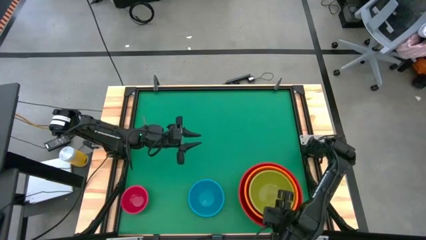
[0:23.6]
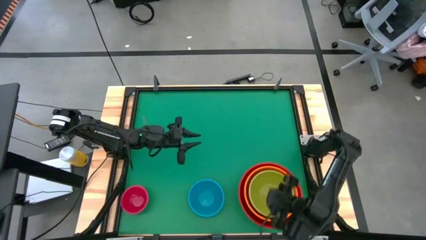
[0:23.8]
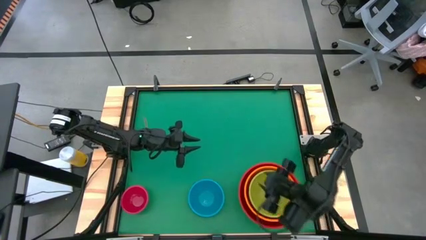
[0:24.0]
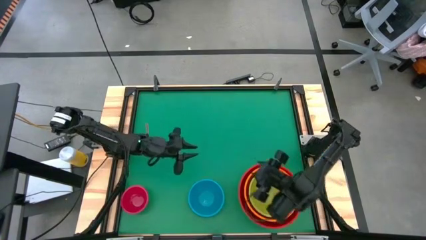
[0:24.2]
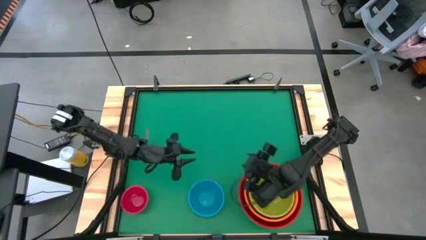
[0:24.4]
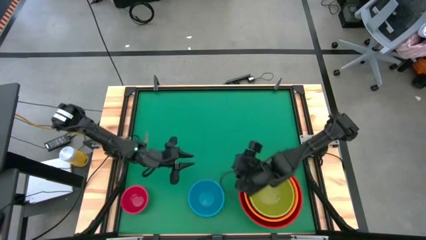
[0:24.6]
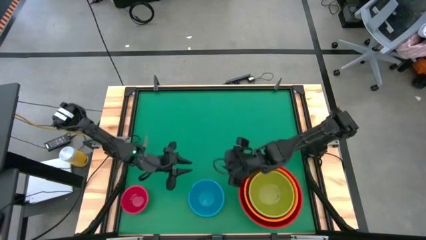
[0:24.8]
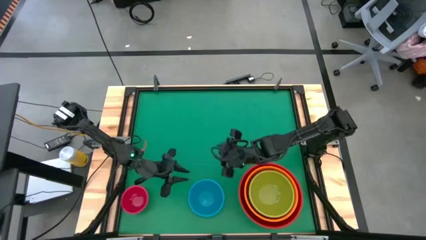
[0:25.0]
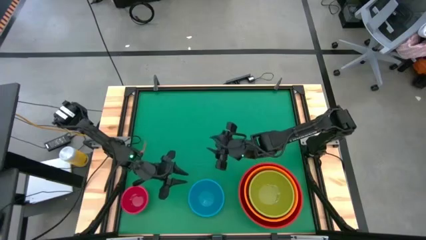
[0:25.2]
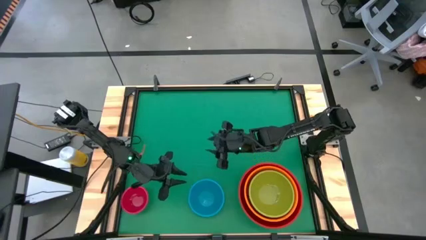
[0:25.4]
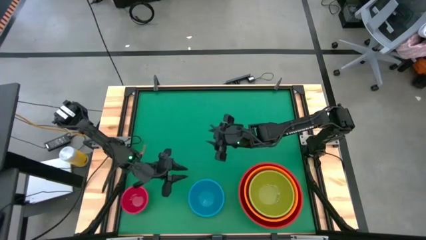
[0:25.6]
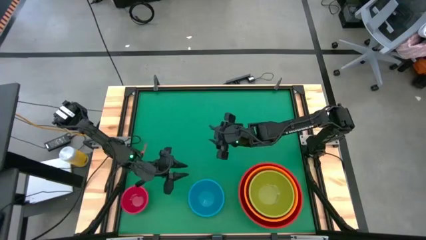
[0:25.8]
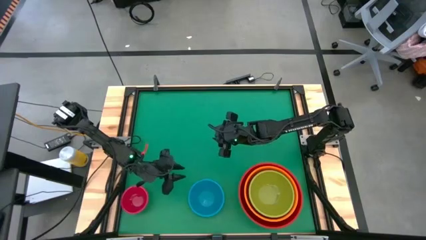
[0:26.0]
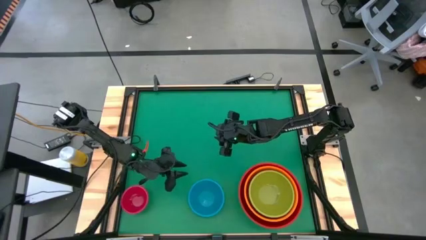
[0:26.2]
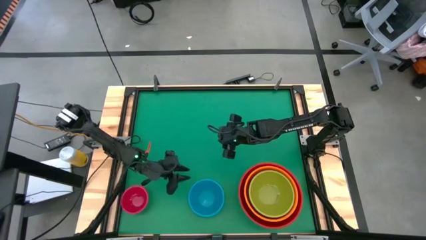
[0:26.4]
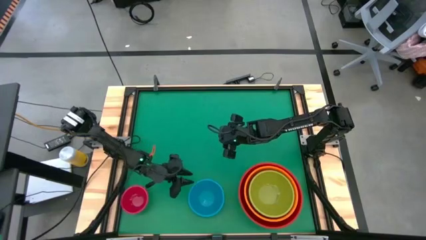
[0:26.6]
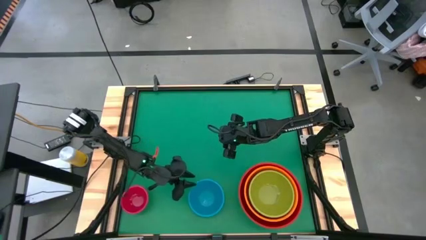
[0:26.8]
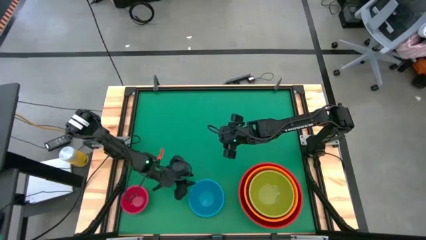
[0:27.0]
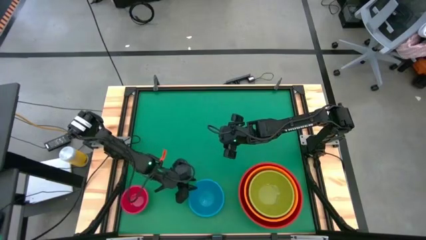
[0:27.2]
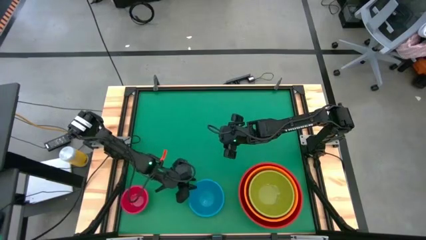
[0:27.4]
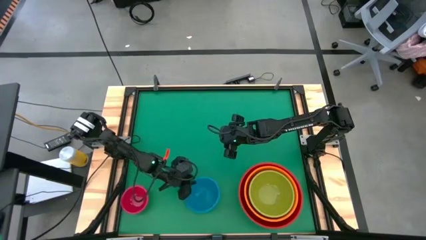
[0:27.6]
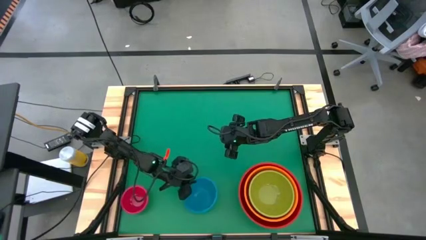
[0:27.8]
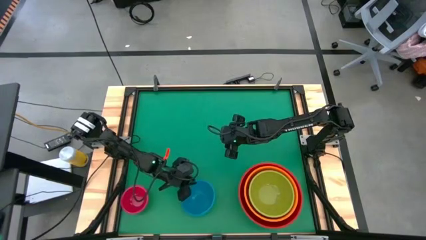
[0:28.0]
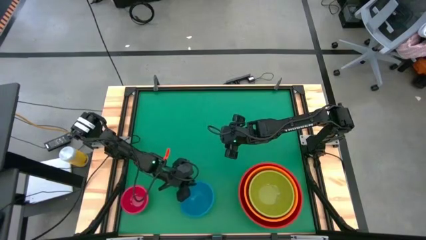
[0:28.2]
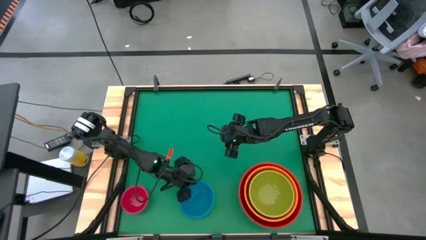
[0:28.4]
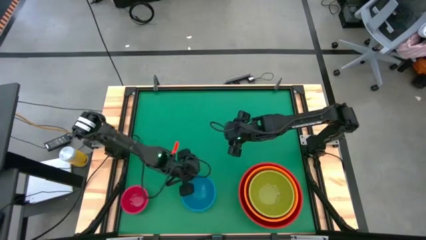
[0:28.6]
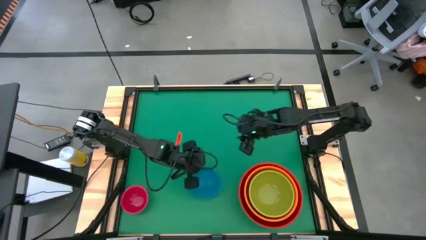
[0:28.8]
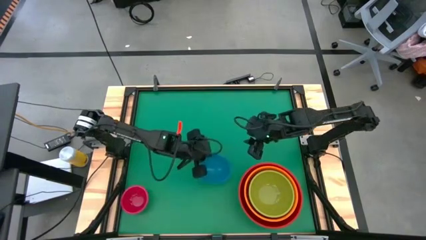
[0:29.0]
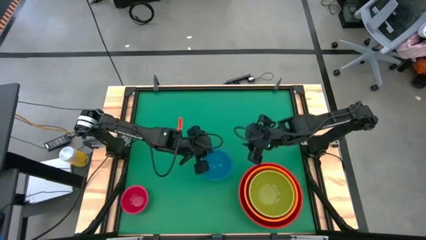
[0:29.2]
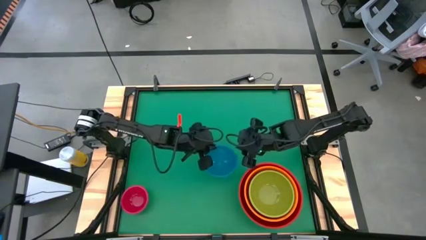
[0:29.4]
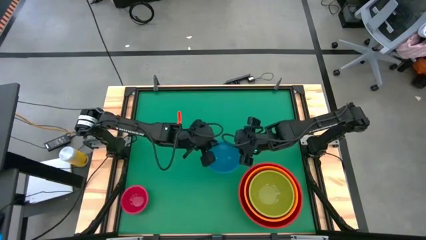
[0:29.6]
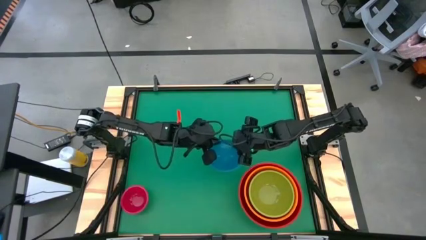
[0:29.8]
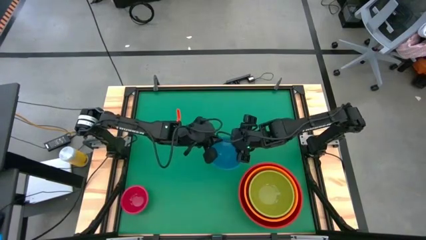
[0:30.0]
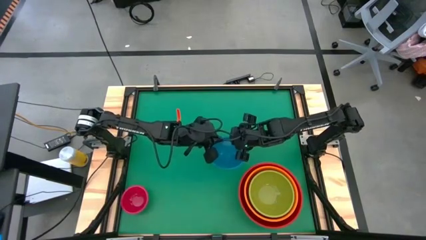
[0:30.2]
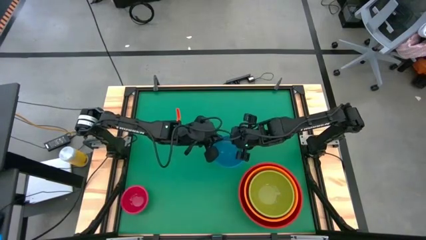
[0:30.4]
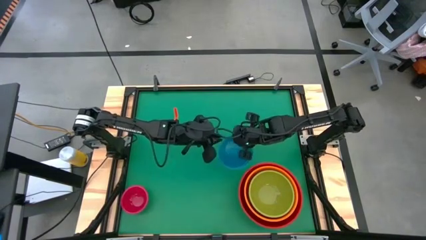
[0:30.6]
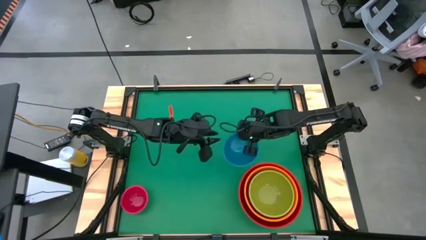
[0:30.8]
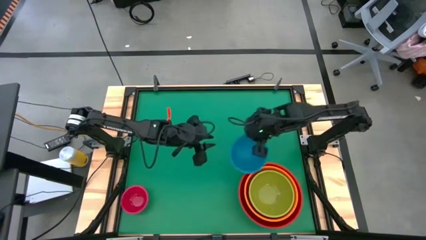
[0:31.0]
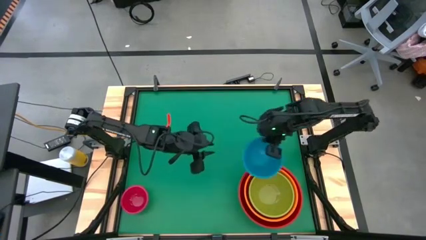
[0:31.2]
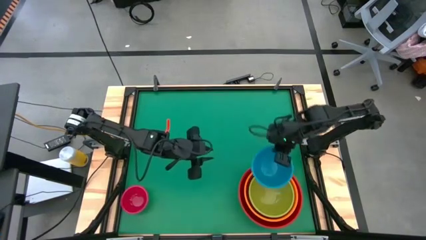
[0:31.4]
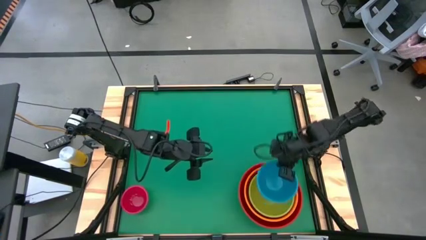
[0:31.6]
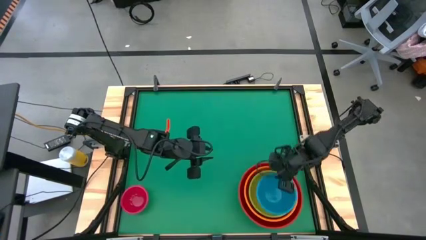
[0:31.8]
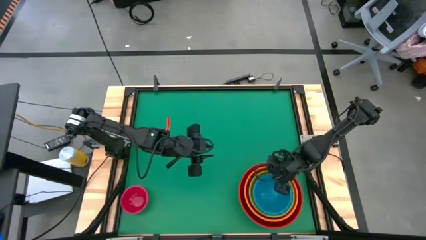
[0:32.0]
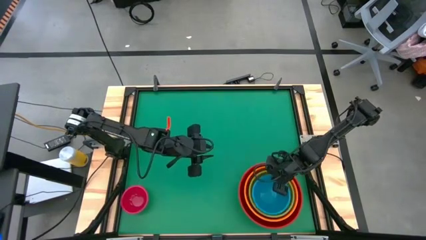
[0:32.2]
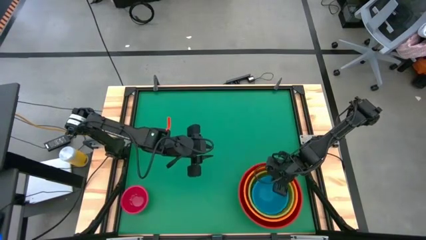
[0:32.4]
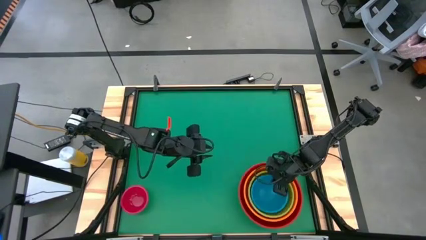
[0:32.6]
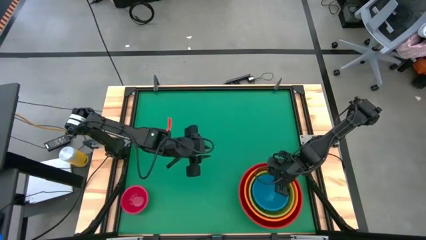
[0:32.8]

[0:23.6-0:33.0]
Stack the blue bowl on top of the green bowl

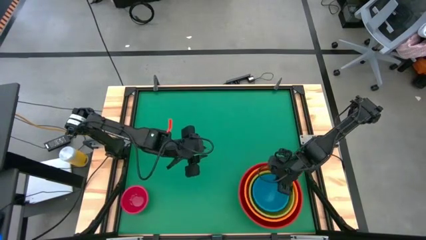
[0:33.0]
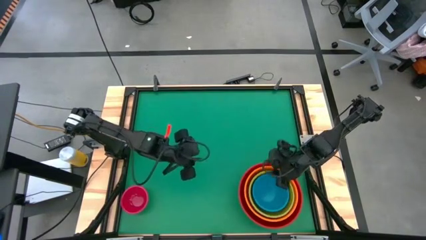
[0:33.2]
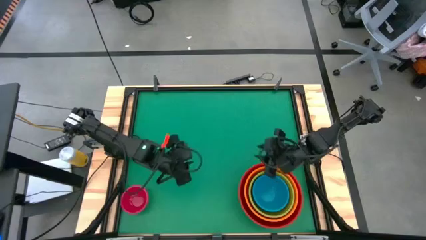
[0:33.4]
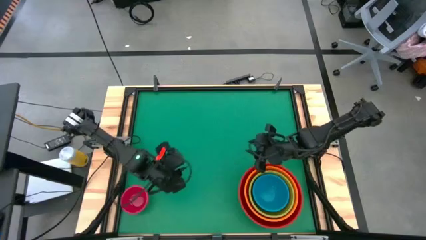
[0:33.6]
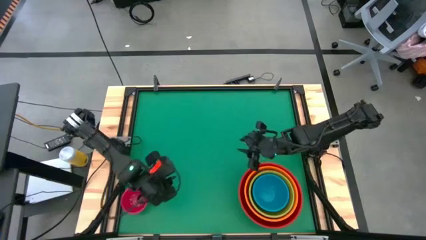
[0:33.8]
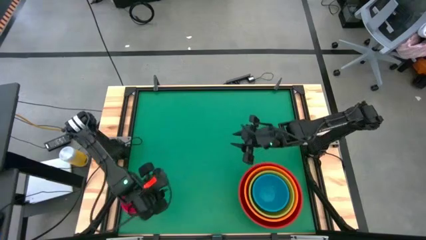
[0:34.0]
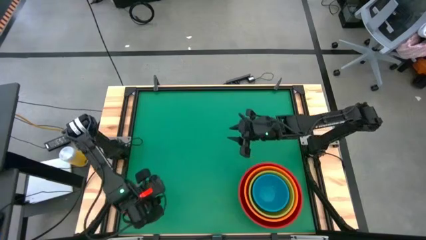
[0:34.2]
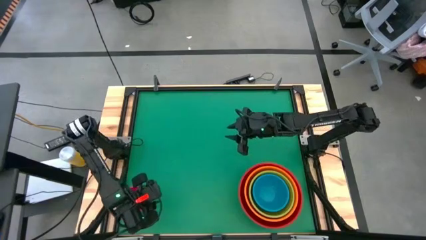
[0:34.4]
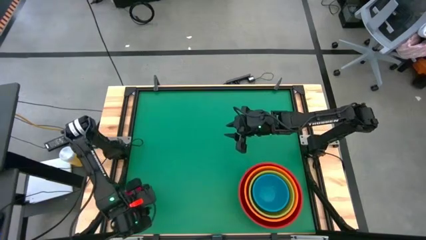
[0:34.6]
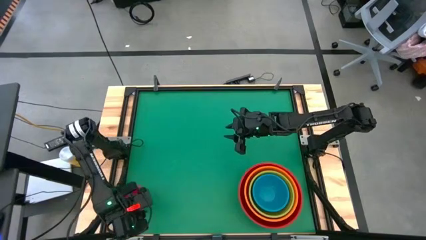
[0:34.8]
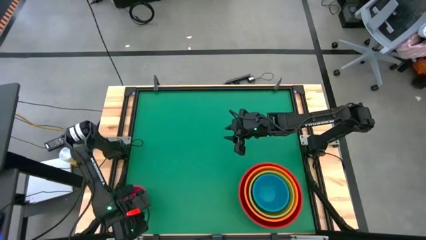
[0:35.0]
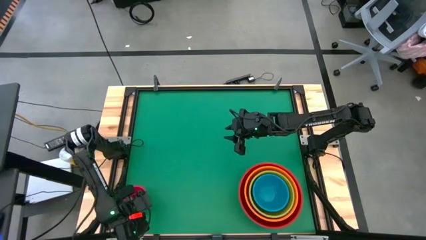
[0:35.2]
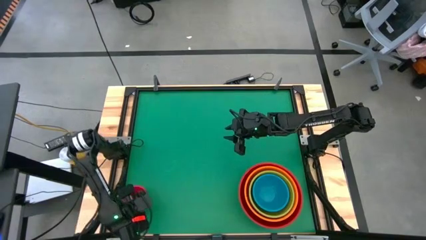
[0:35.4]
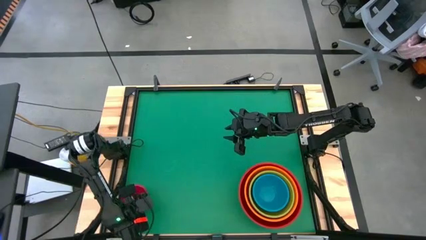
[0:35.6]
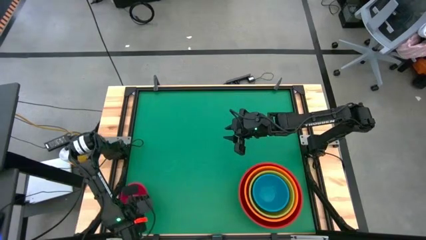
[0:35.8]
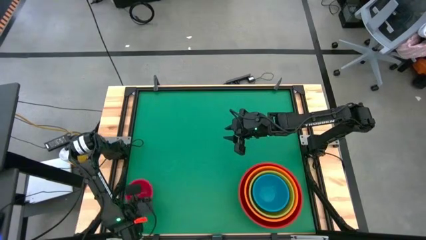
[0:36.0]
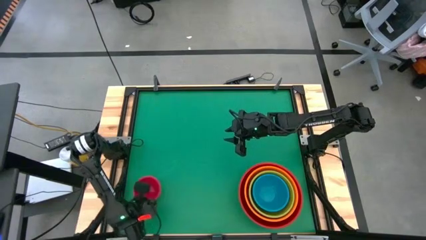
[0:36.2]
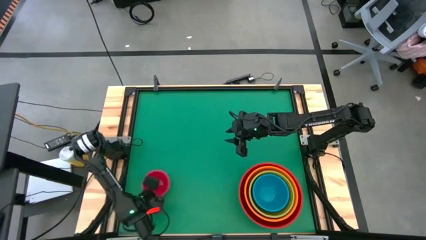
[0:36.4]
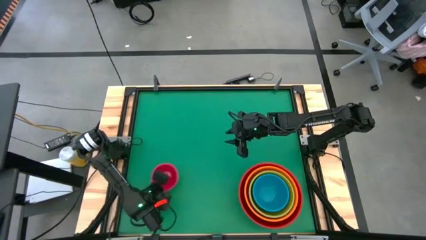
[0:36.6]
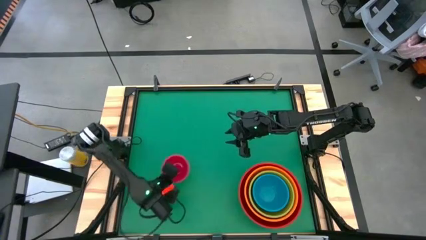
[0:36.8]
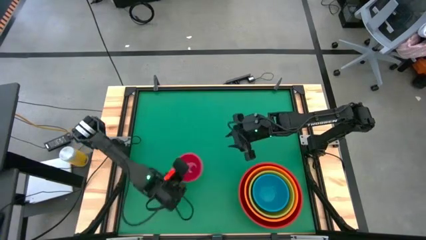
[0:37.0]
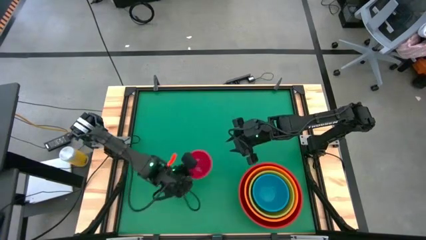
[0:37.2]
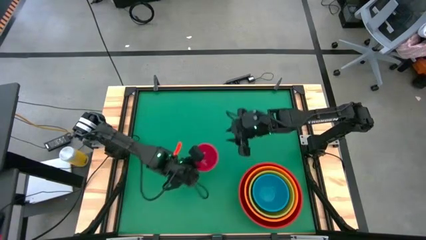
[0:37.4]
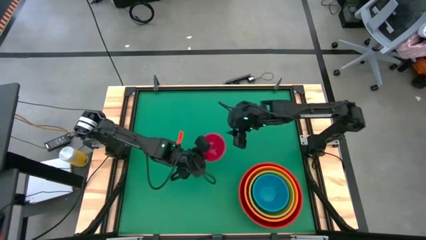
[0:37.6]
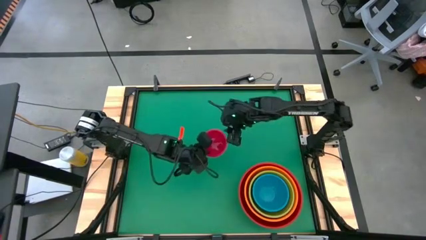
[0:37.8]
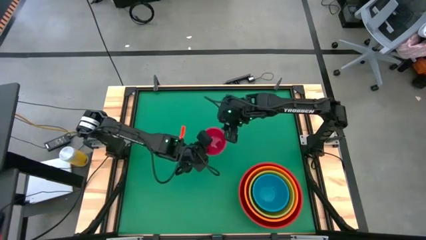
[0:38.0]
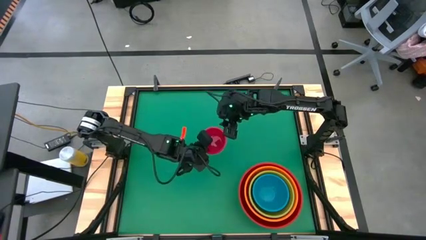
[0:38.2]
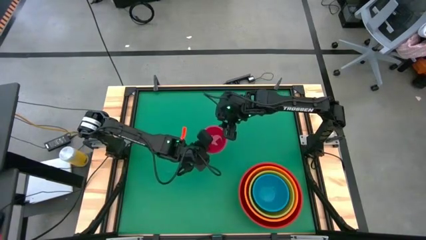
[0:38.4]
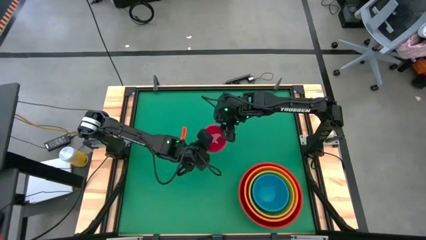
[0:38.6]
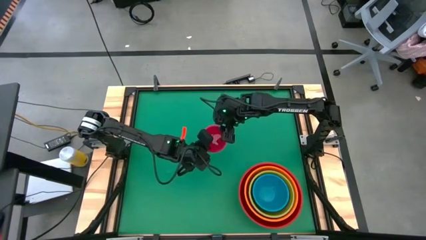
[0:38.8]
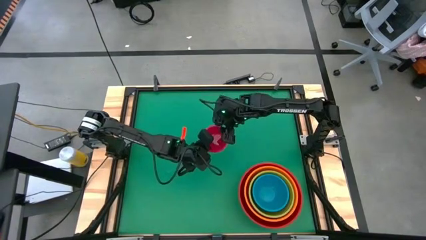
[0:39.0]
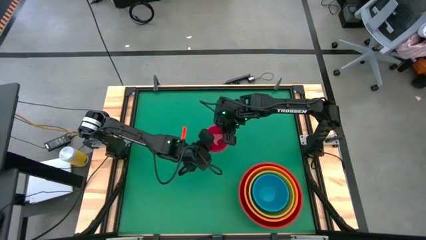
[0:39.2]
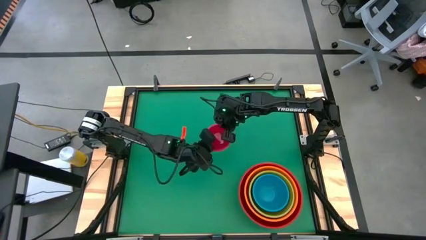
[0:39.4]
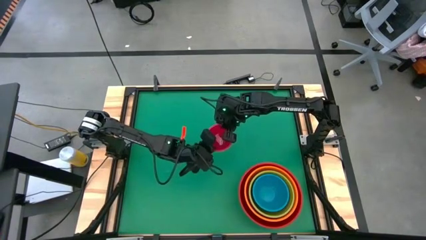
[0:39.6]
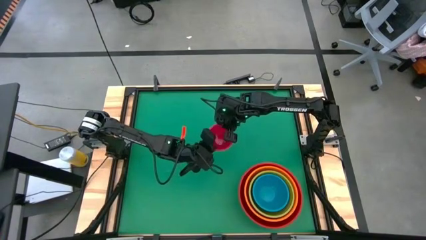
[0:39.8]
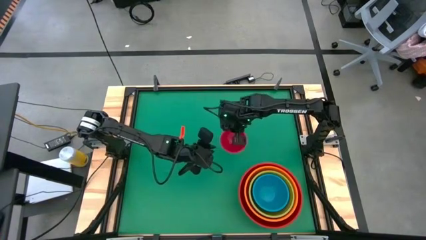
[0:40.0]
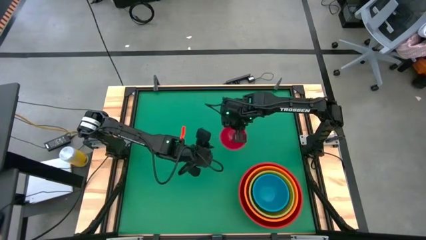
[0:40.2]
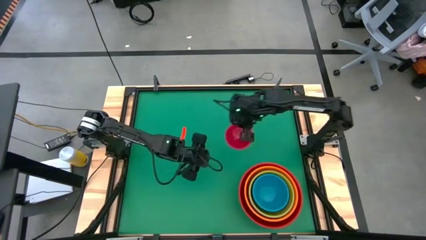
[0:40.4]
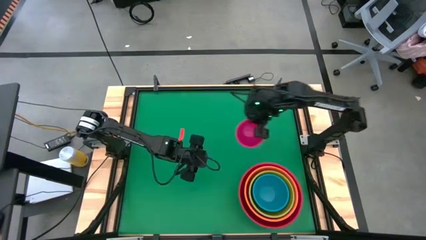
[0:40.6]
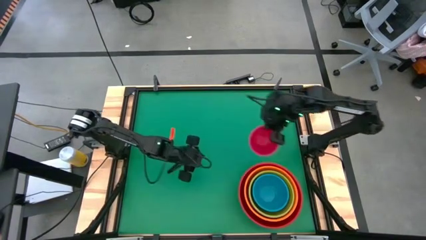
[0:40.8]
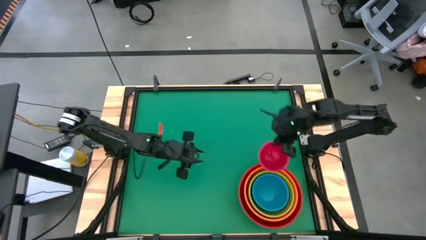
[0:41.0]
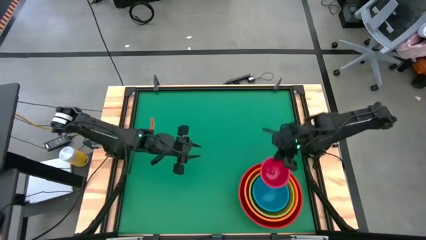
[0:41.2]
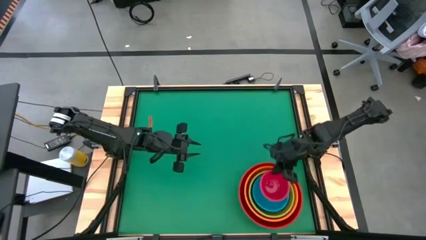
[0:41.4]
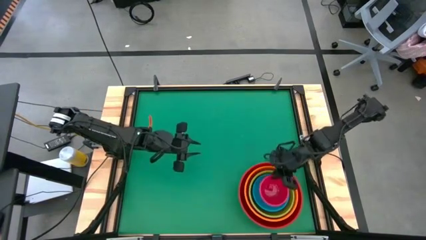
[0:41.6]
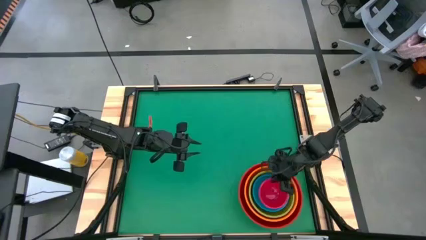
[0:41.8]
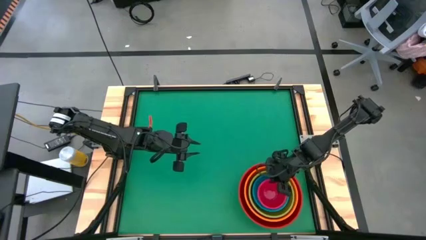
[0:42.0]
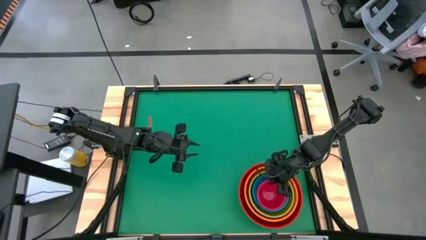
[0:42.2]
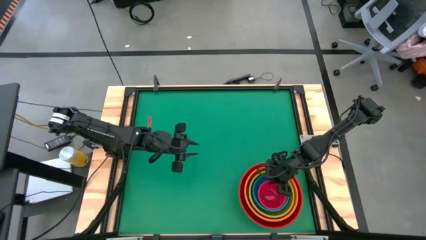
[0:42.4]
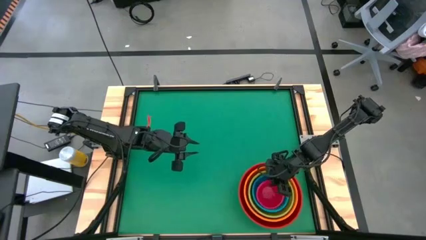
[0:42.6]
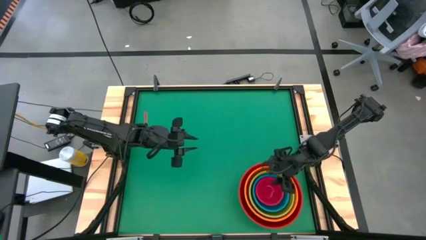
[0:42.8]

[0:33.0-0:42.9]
Stack the pink bowl on top of the blue bowl
